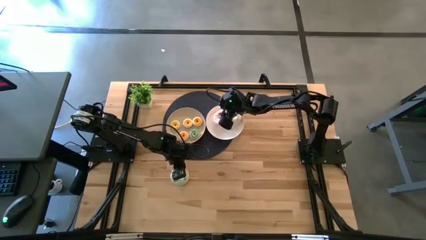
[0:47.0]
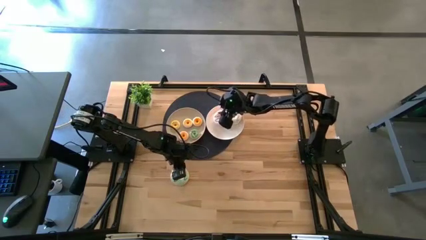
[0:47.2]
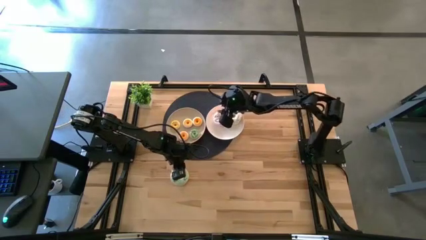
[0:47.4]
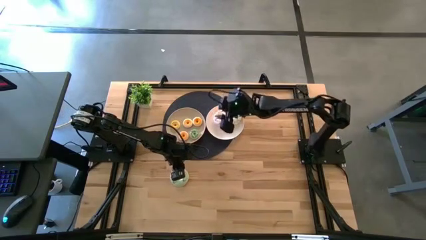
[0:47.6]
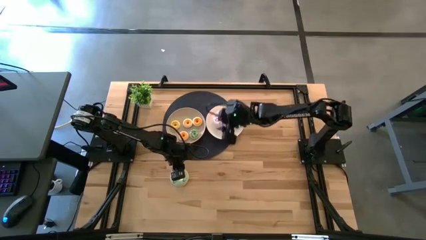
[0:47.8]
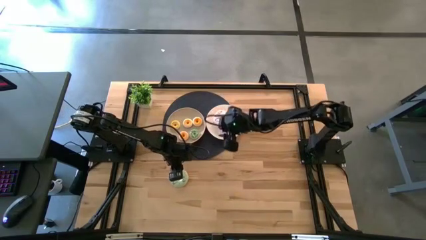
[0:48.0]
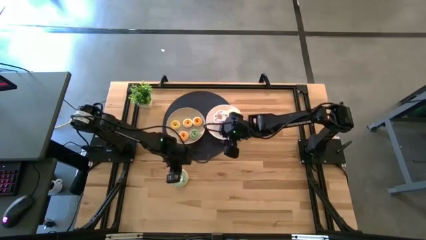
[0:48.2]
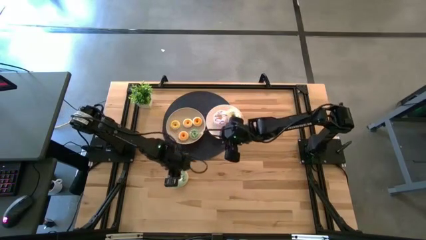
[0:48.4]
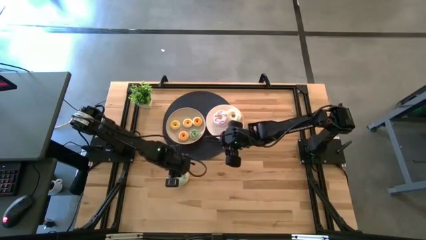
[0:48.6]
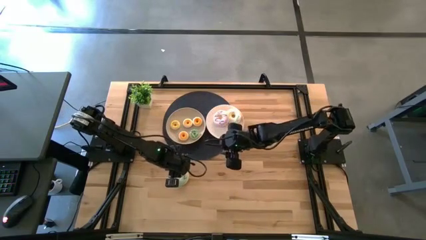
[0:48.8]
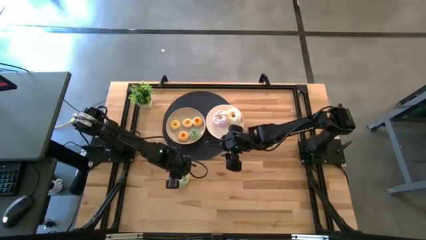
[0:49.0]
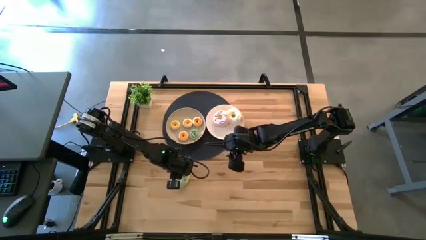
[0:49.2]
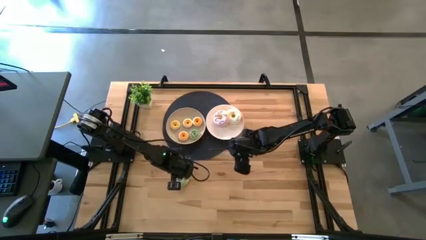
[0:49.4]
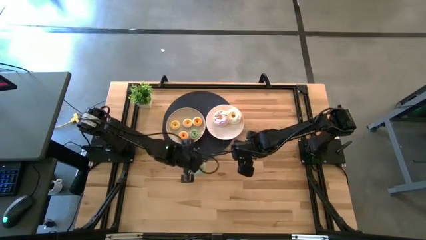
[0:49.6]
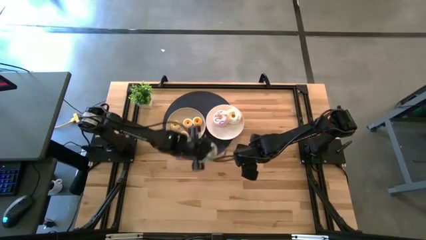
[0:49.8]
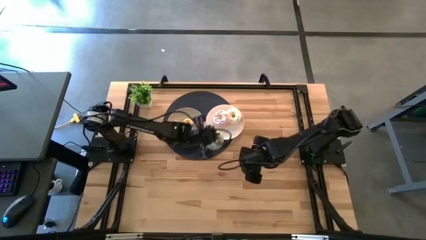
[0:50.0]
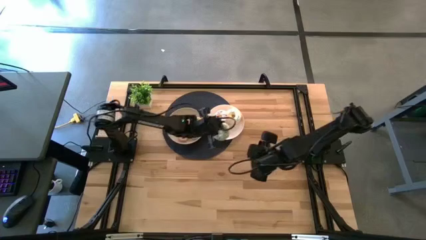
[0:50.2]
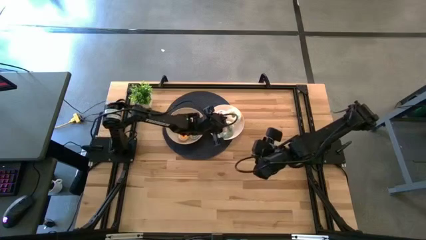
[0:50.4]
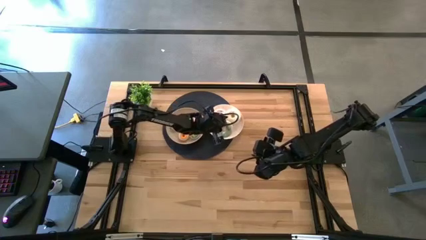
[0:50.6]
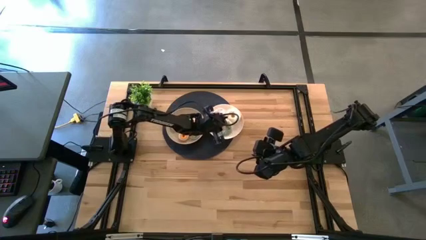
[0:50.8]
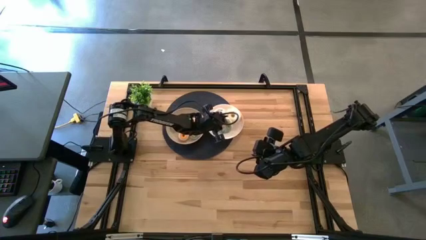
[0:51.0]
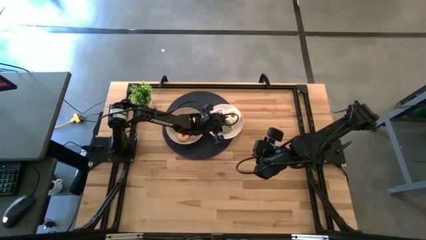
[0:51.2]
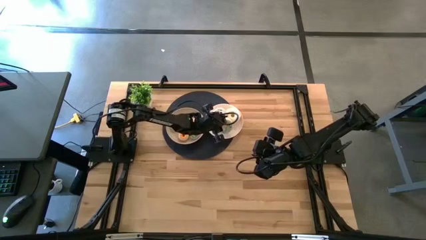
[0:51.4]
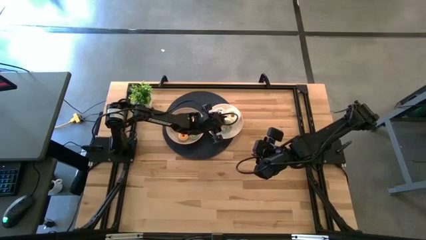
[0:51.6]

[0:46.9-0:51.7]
Task: Pick & Place donuts
Put the large light green donut on the white plate

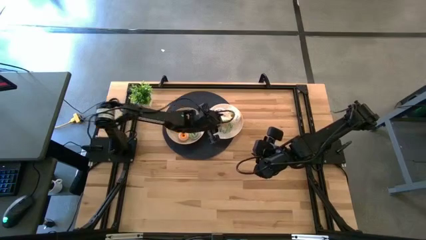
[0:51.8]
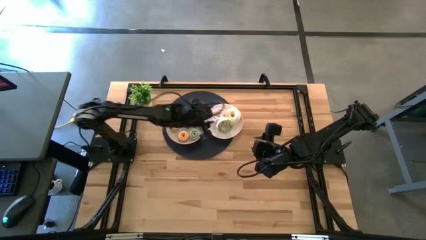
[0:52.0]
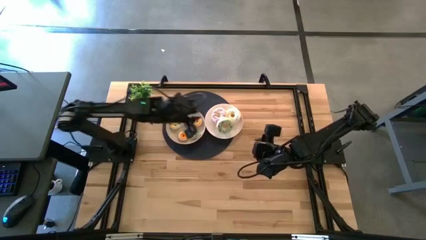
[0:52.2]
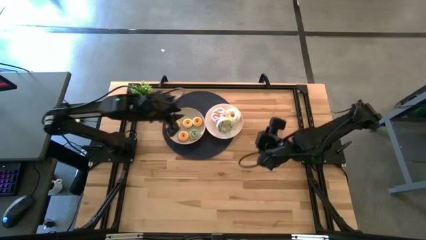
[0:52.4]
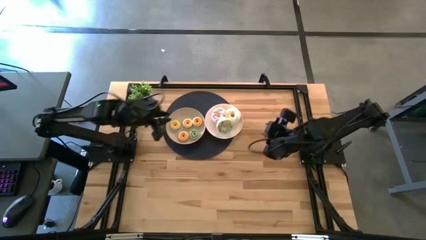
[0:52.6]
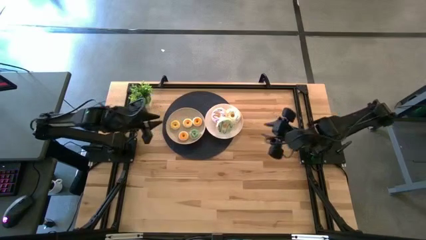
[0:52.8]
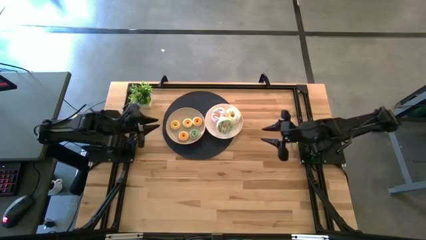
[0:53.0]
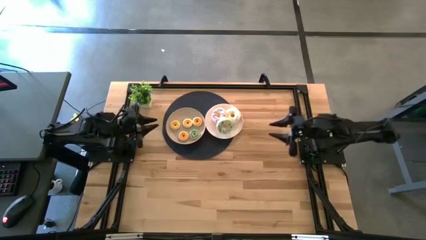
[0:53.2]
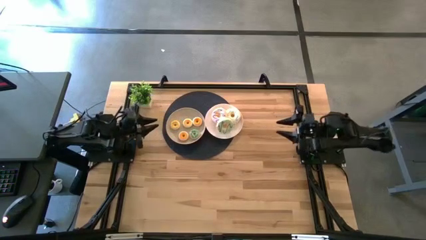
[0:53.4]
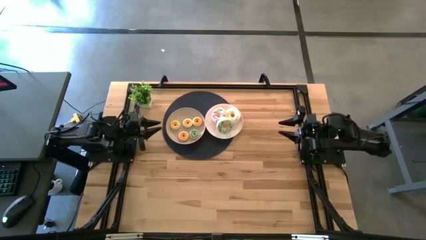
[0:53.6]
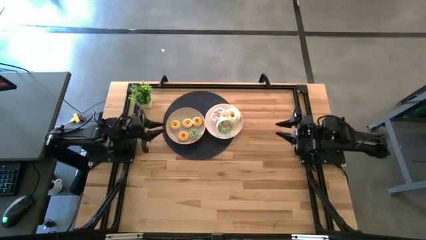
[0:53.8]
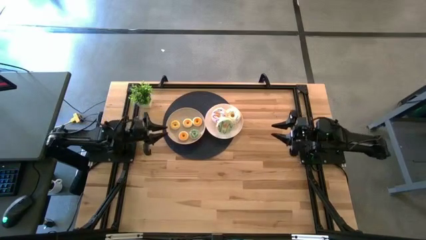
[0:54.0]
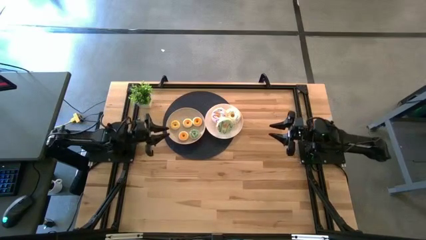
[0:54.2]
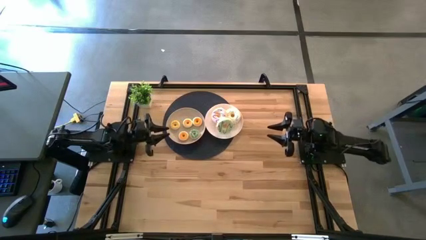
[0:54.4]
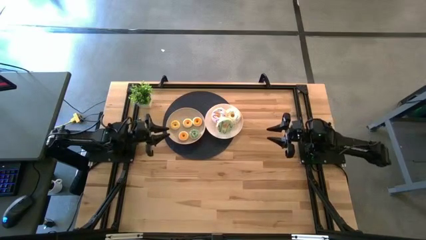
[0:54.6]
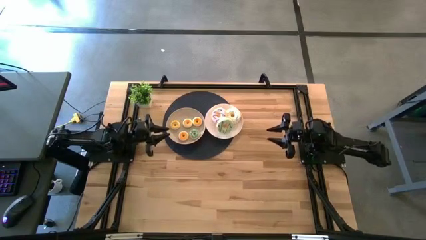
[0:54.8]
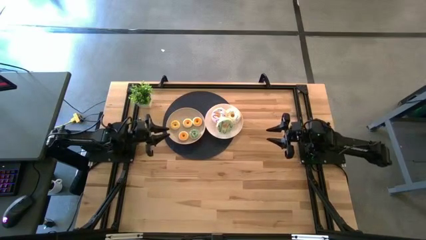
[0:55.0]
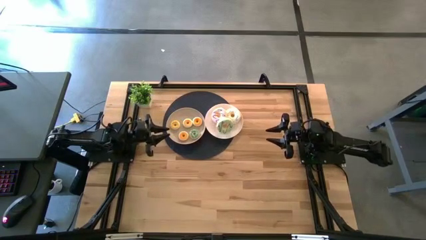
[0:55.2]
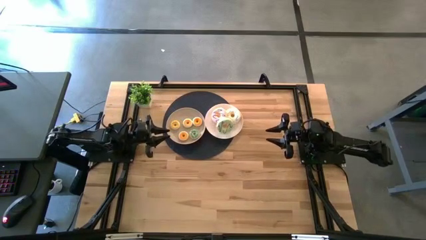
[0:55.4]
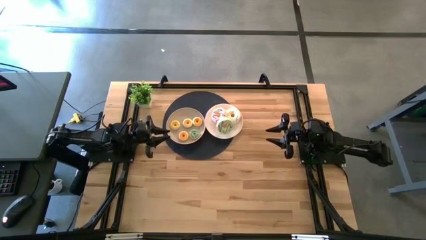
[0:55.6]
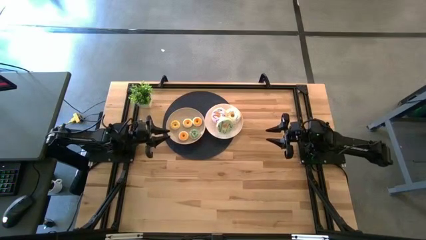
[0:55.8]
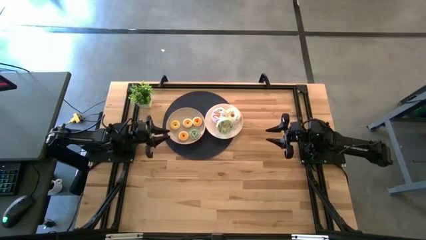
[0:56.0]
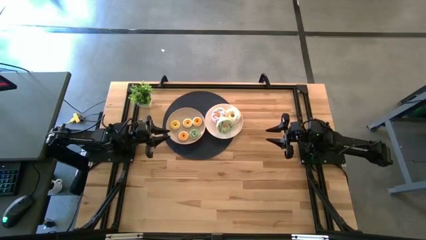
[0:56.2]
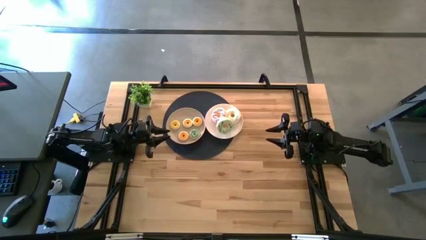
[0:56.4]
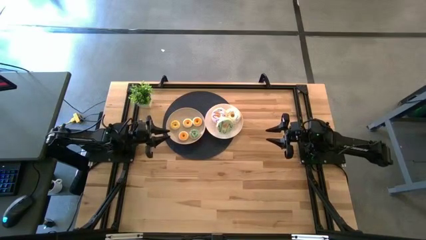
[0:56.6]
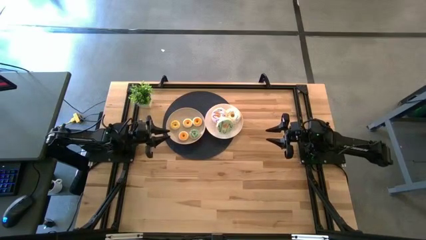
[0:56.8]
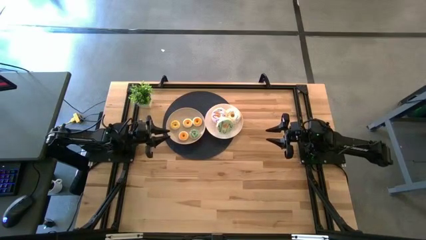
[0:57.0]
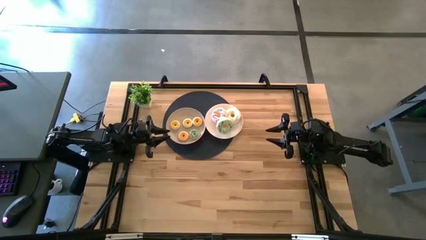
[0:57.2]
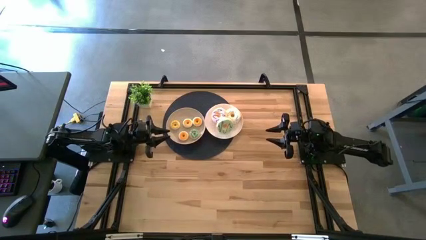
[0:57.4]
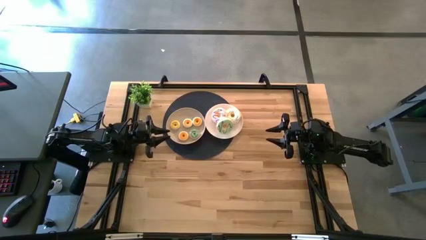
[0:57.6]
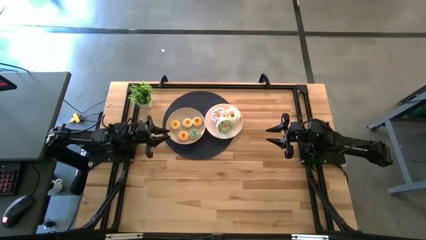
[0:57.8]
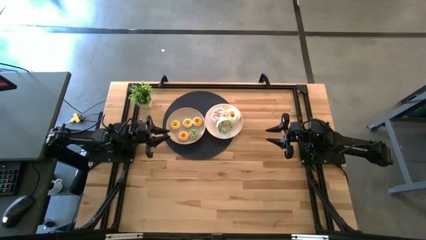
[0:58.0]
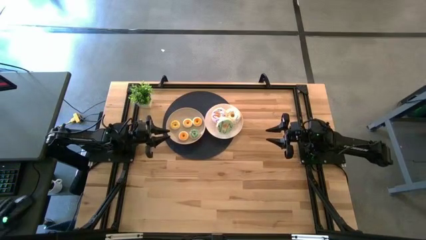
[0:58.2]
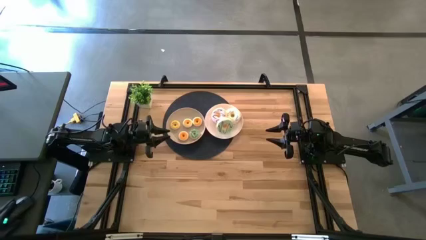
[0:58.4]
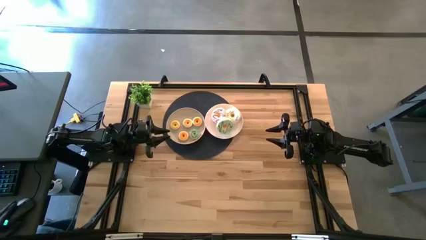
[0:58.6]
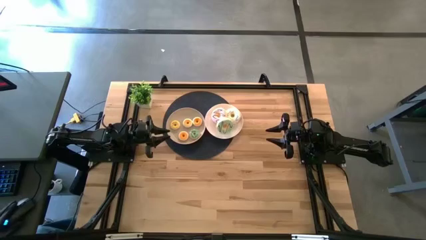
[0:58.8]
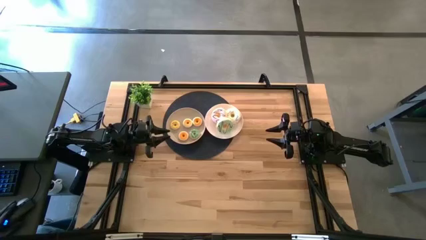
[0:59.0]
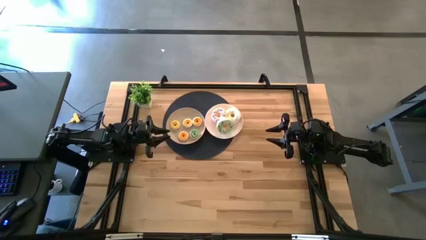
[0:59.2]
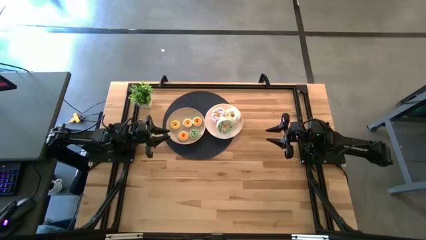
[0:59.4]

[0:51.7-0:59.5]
Return to Home Position

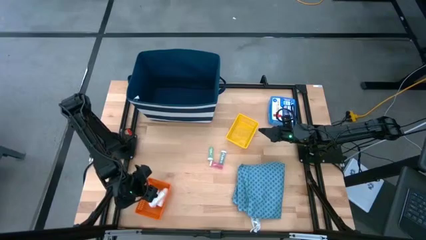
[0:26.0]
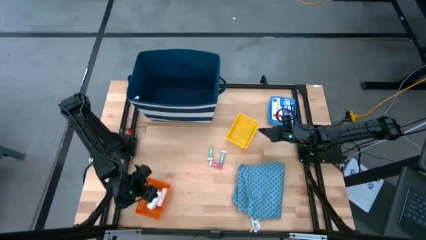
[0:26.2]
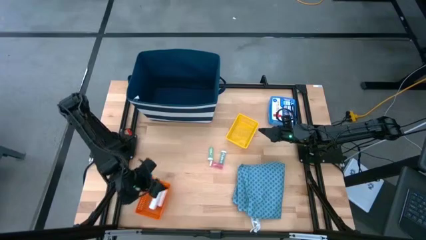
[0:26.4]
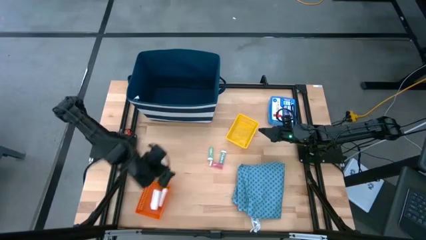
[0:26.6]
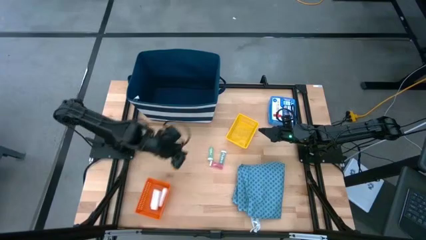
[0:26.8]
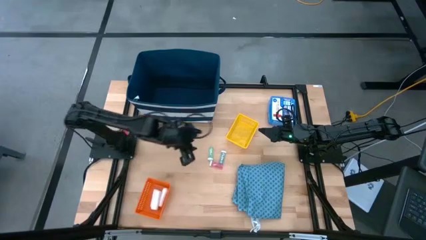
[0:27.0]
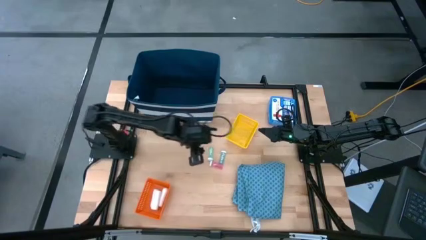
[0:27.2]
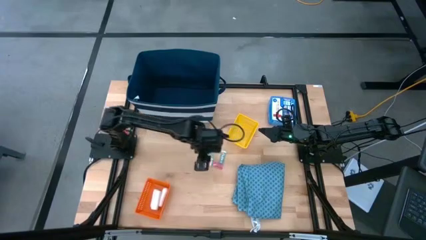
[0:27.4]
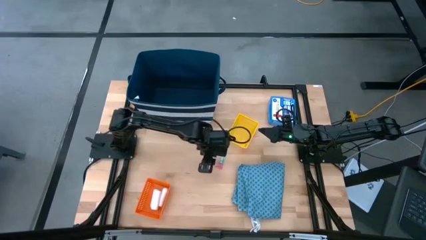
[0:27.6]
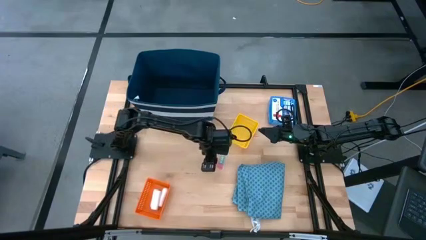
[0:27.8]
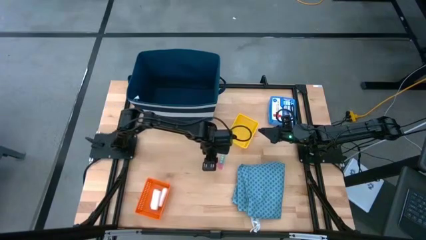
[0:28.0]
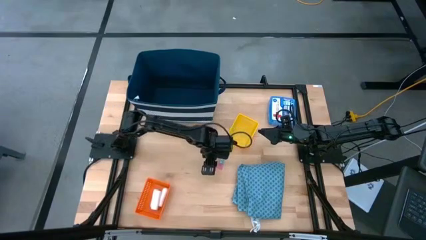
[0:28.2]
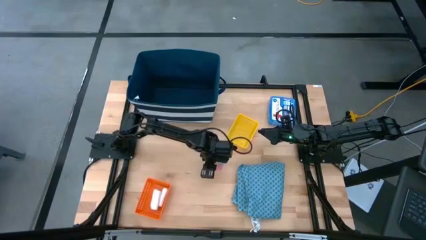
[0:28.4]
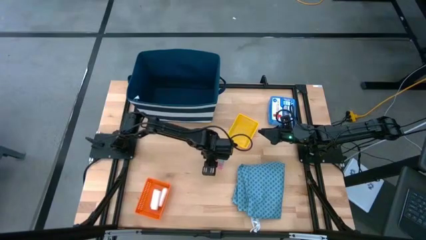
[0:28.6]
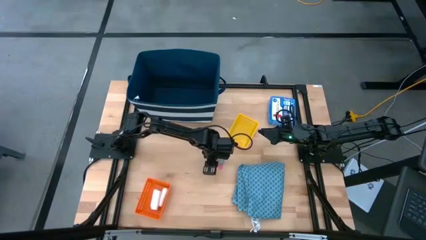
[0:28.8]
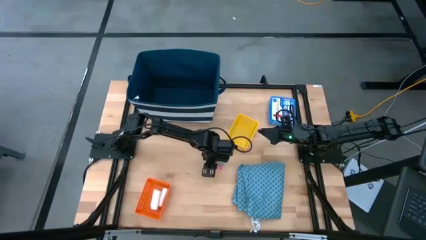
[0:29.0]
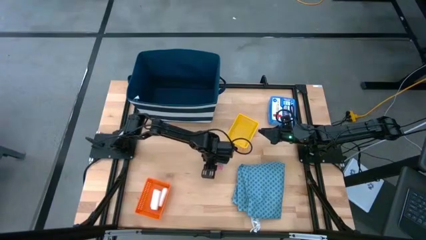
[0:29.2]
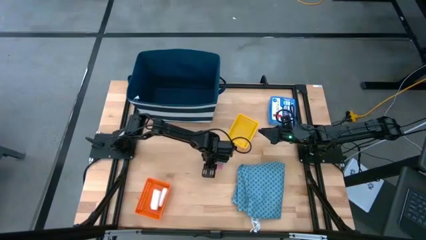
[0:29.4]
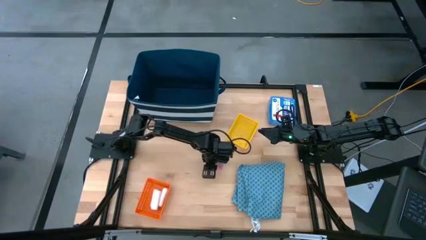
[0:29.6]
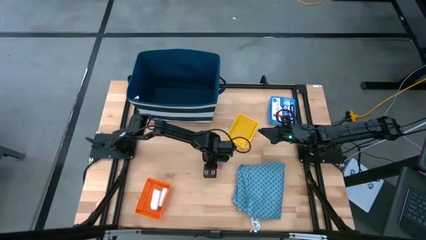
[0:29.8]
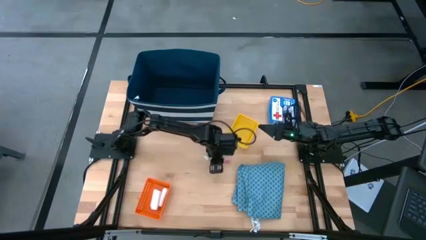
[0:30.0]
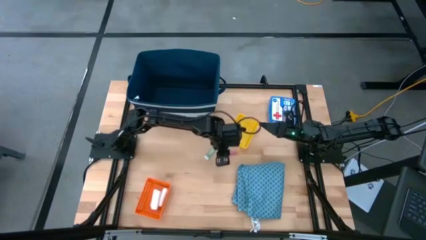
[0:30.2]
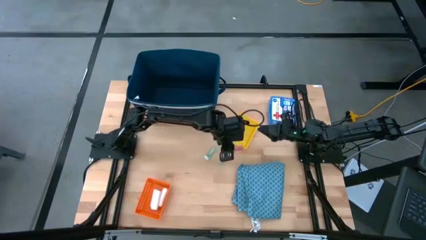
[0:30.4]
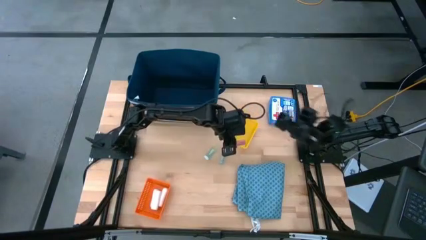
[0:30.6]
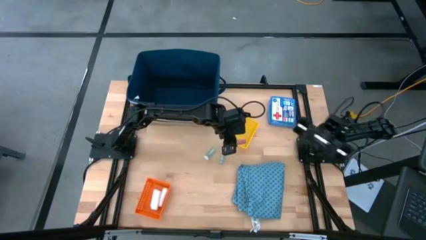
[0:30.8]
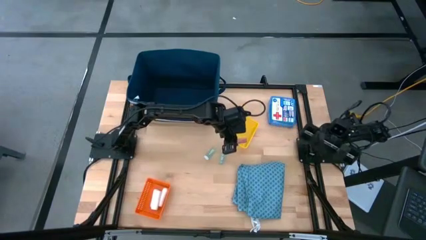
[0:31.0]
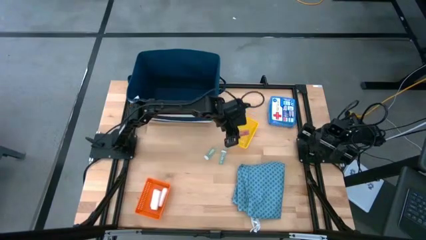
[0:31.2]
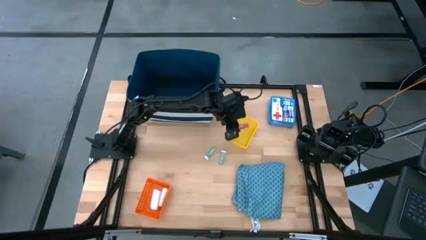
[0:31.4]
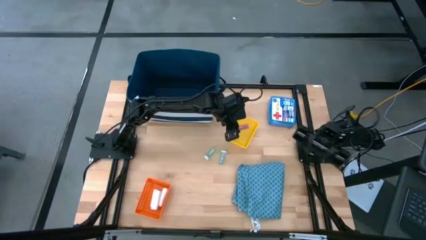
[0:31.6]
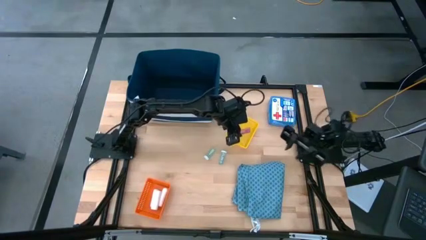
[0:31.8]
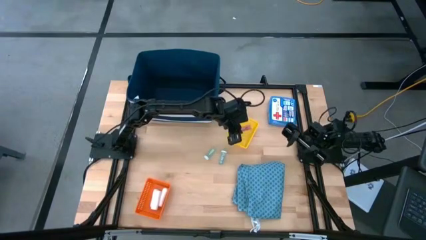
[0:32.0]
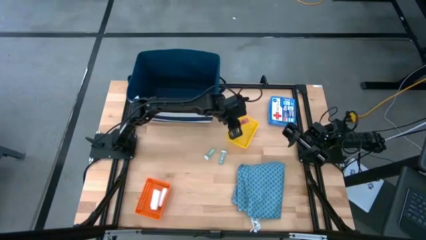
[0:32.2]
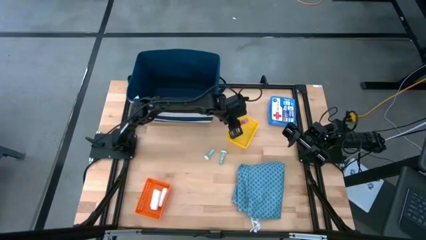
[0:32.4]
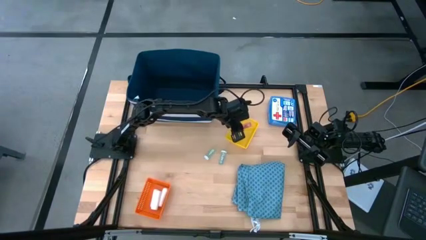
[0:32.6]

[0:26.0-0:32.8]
Task: Pick & place medical supplies in basket/bin
Put the pink bottle in the yellow bin
